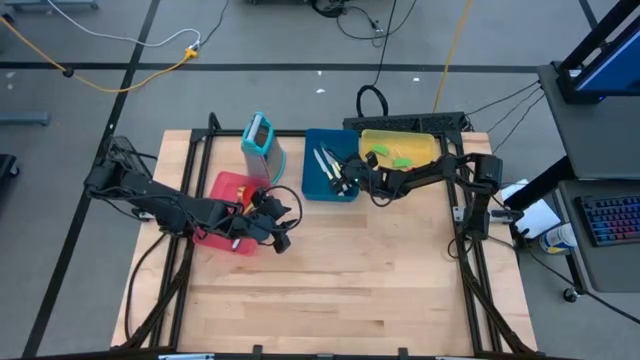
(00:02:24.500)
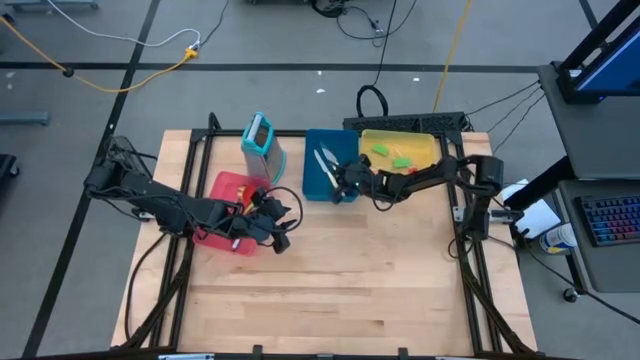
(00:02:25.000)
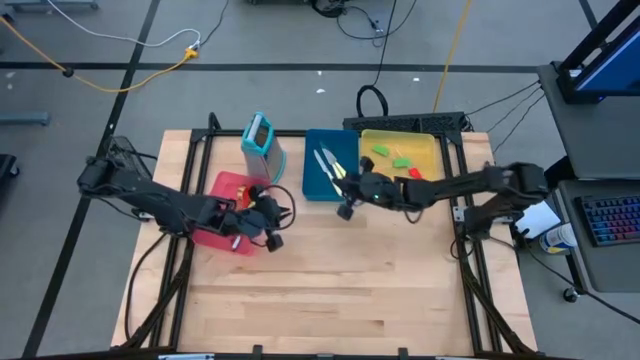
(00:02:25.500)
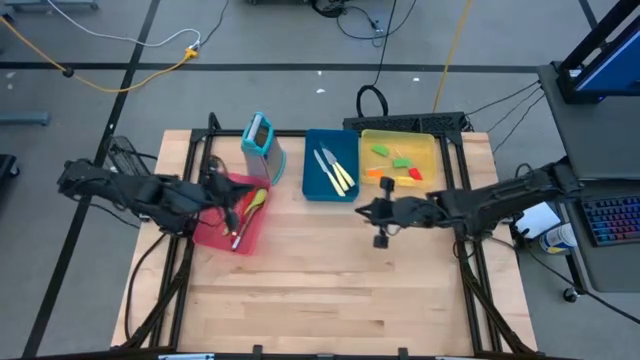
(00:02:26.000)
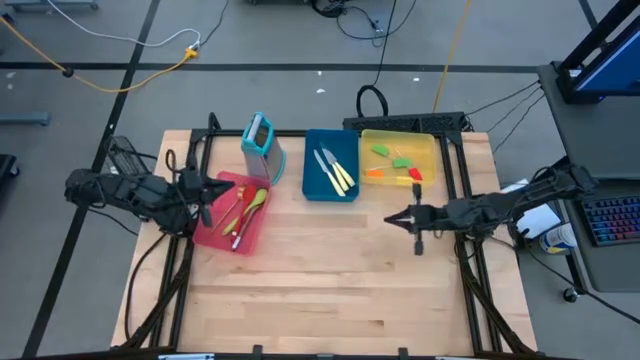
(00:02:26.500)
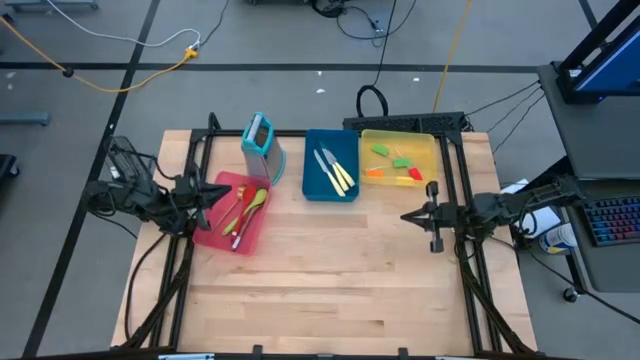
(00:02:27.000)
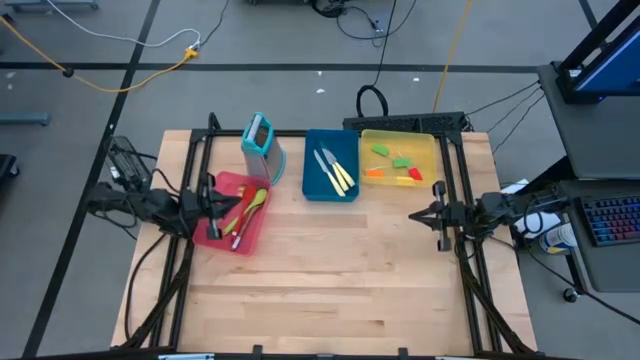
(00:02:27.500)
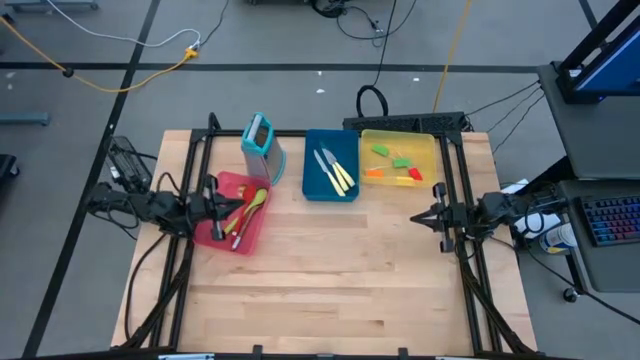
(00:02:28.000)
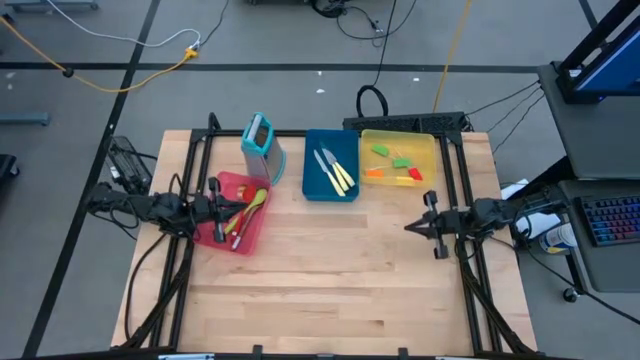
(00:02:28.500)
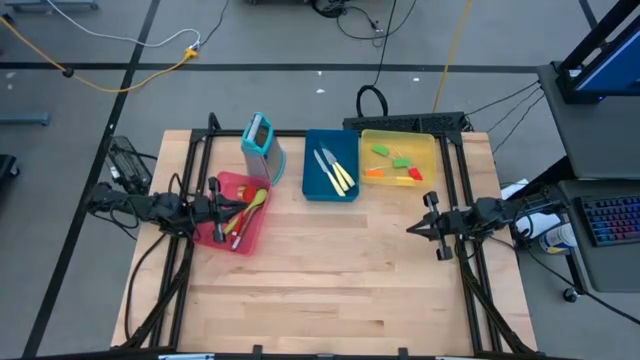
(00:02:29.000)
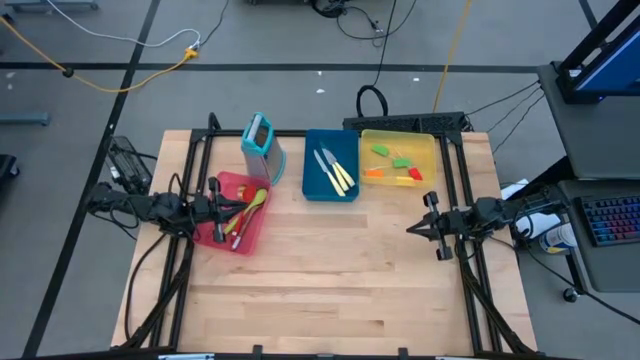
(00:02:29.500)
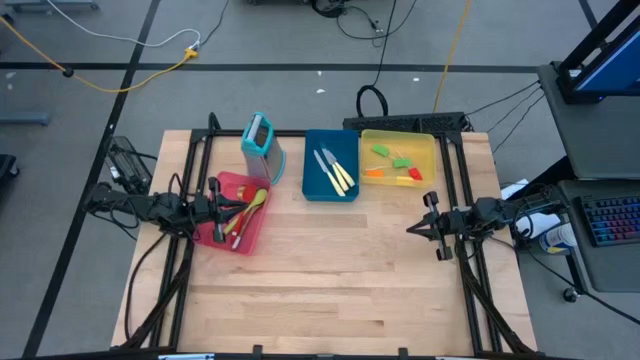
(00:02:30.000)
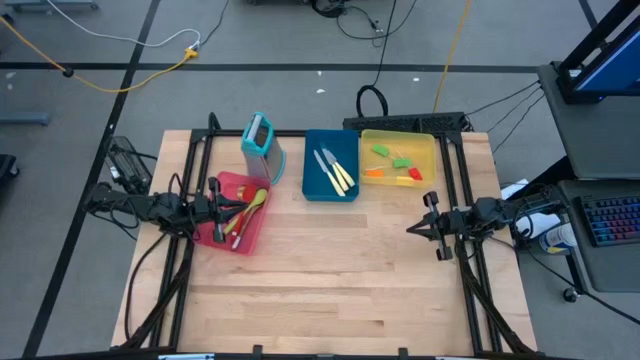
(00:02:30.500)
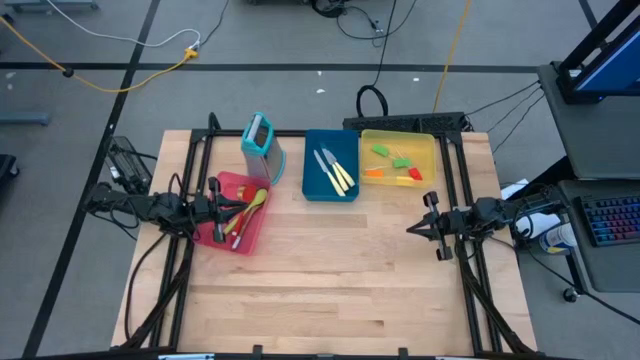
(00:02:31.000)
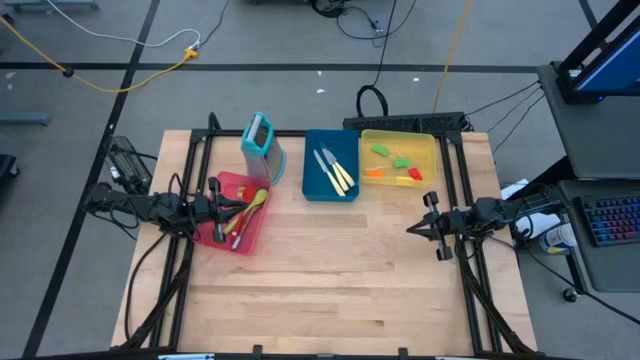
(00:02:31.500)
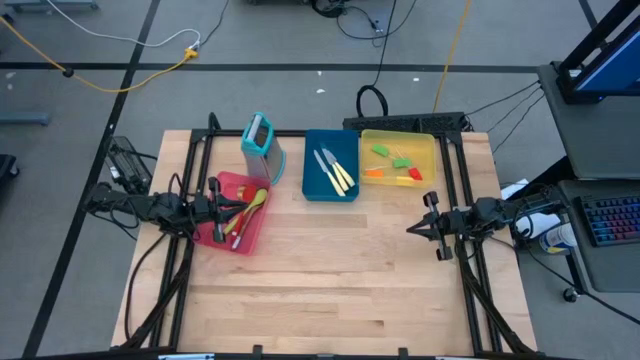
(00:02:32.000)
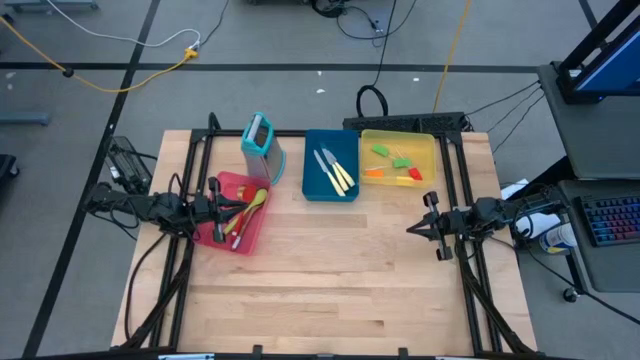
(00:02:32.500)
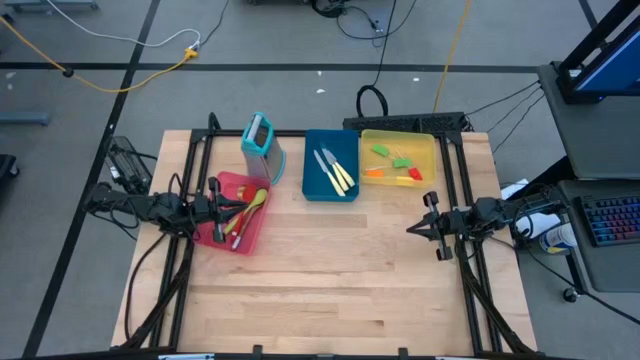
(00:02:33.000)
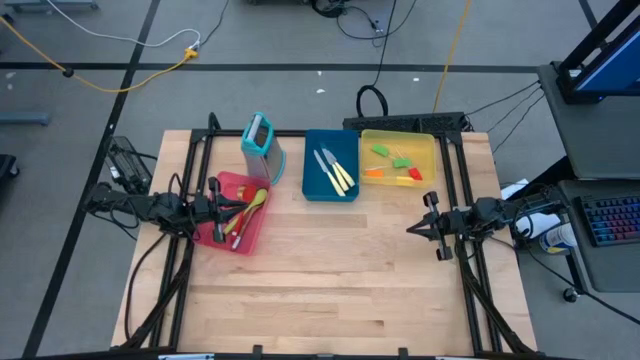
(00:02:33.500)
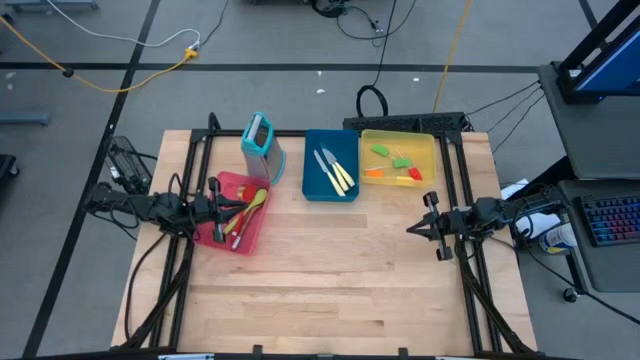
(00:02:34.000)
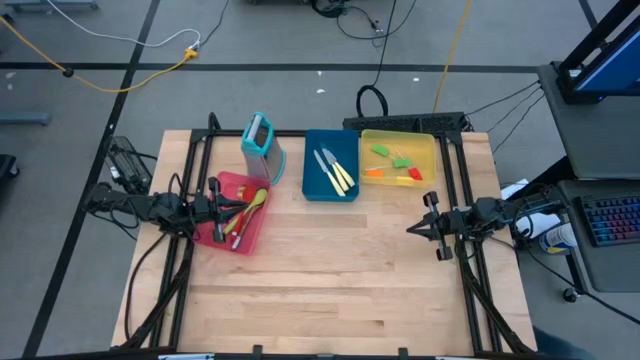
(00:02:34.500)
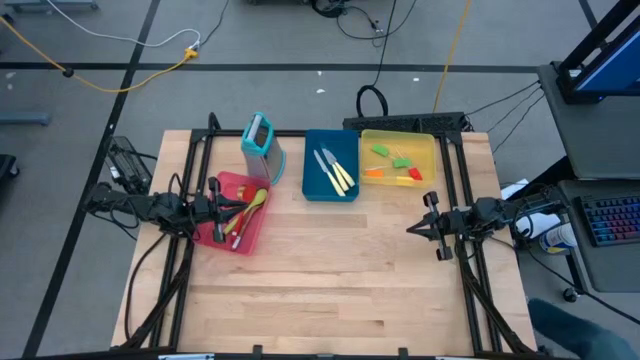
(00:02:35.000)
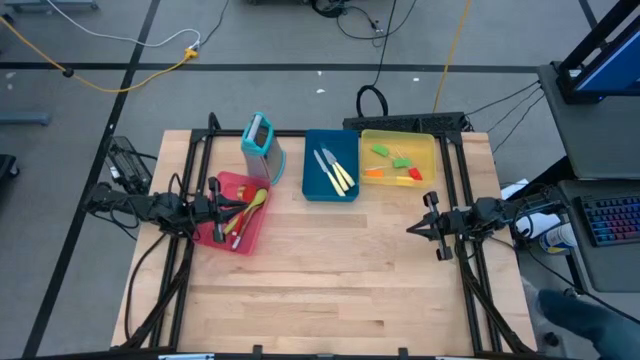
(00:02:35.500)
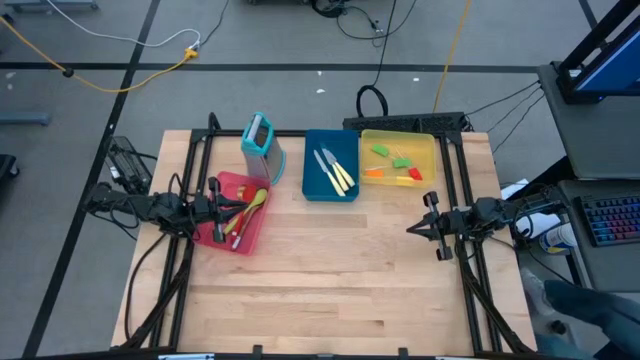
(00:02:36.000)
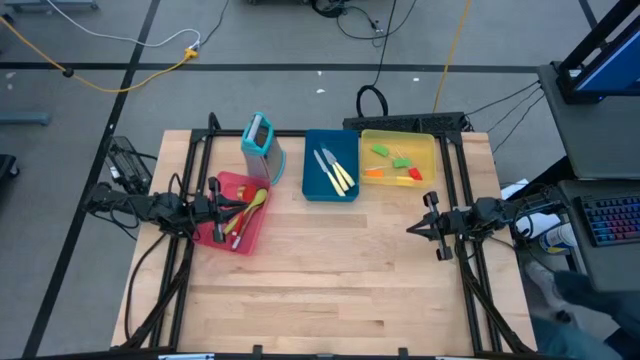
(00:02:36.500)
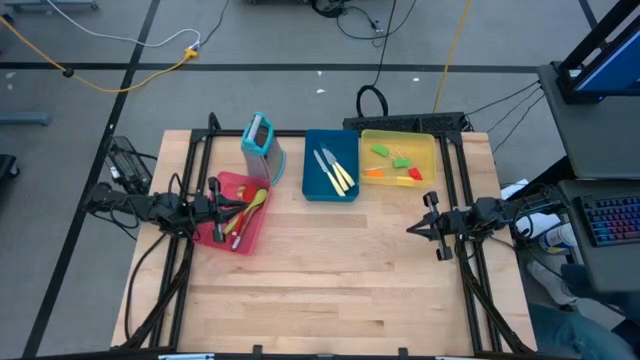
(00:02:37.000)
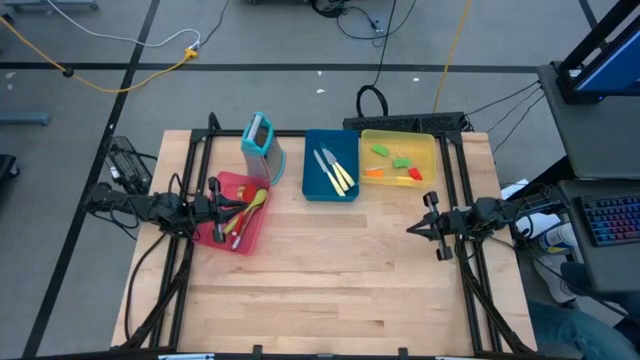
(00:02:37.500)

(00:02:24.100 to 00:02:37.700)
Task: Pick & Place Kitchen Items
Return to Home Position

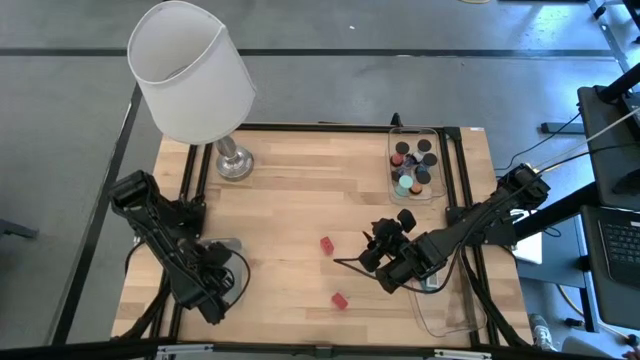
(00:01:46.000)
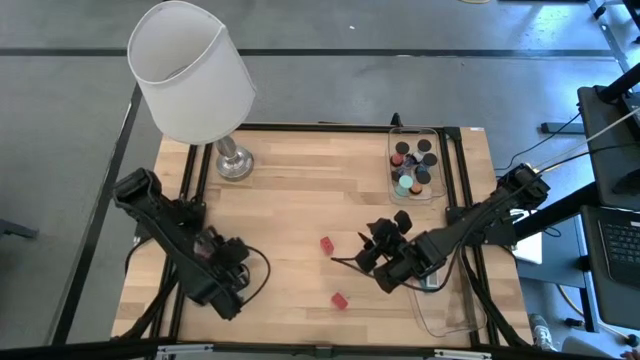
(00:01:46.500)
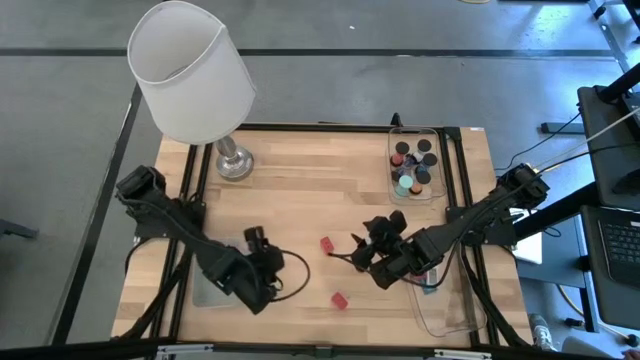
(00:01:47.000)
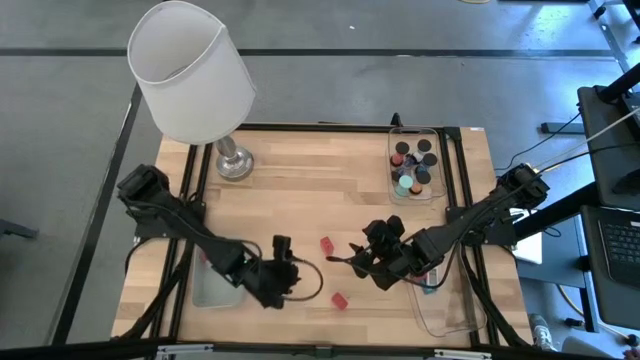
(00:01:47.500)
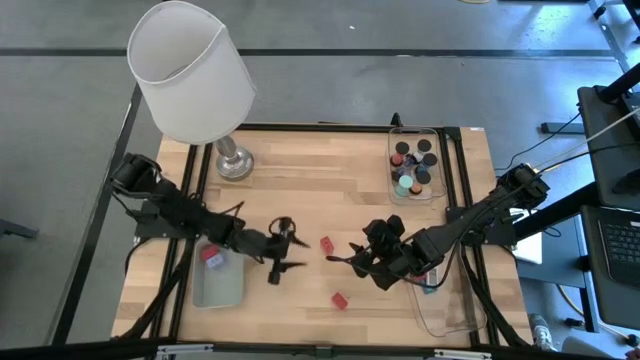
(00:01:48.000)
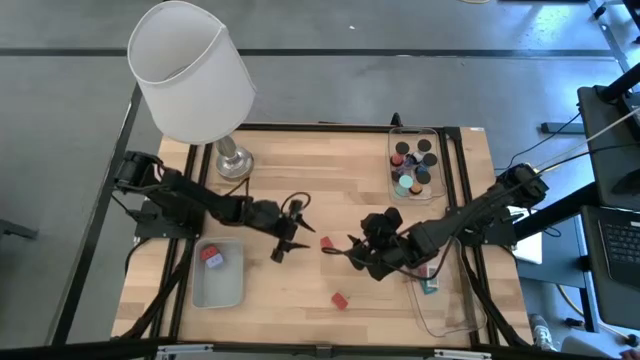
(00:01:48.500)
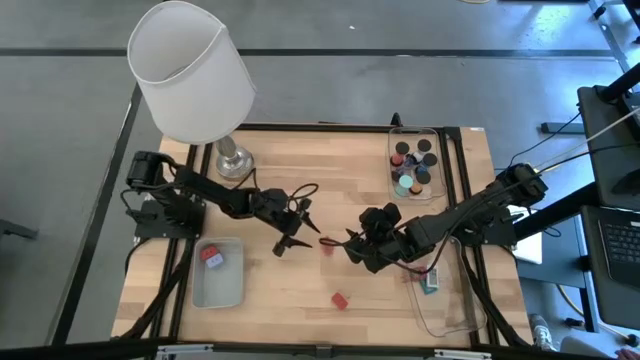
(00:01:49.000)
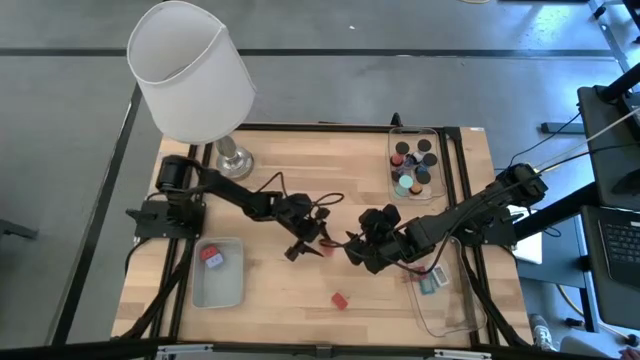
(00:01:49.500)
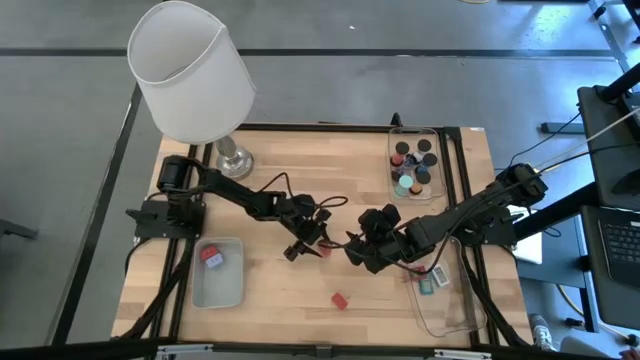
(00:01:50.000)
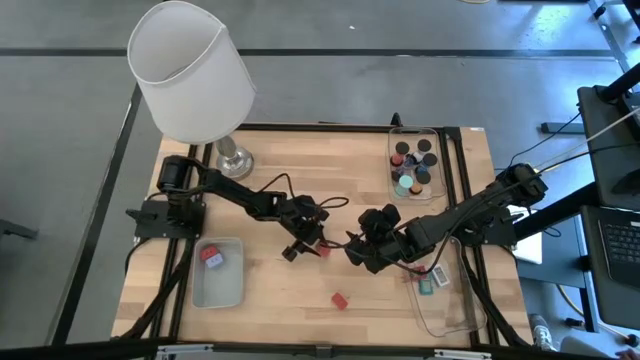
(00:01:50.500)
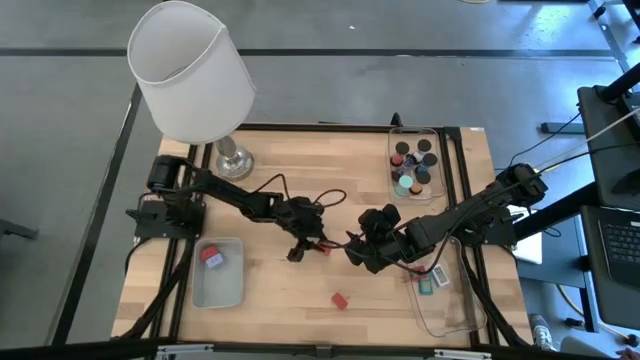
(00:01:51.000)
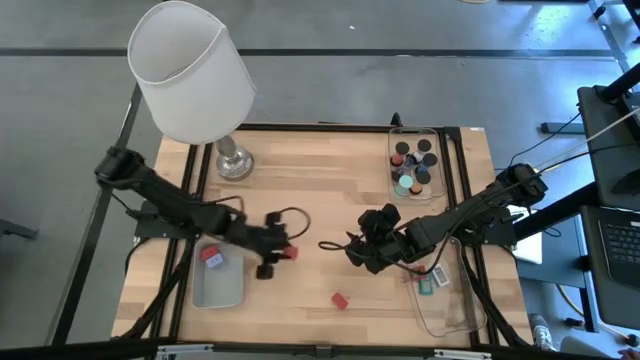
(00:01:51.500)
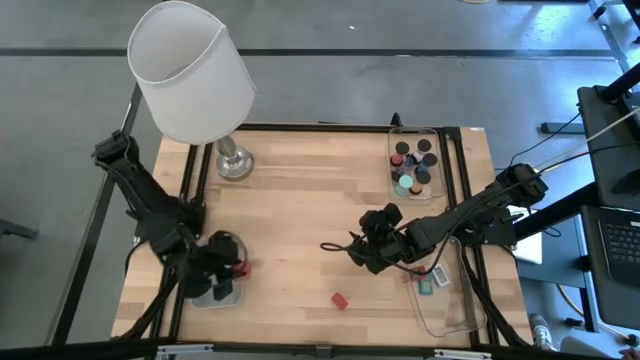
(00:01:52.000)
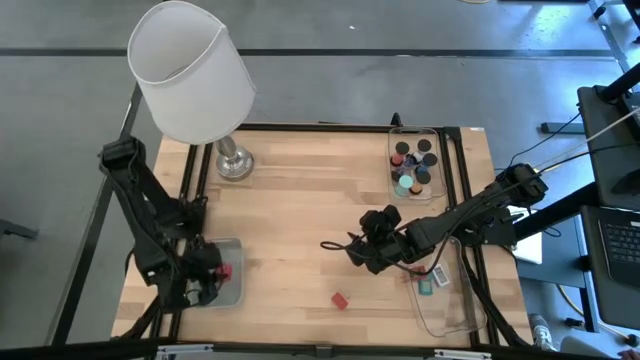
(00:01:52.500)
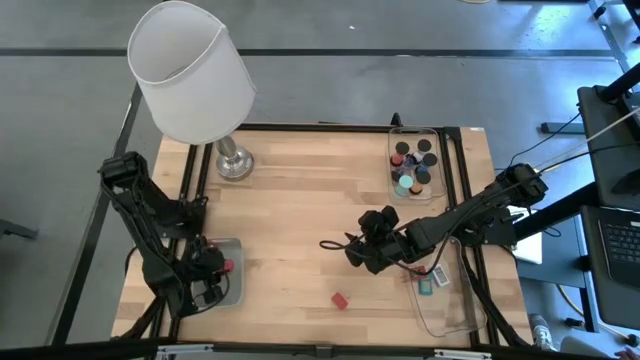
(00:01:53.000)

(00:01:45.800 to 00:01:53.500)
Task: Pick & Place Office items
Put the top orange charger adapter into the white bin
